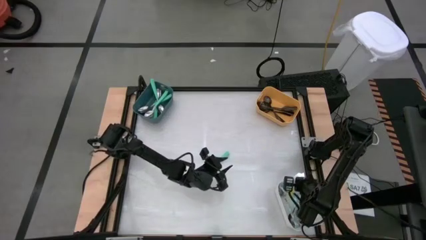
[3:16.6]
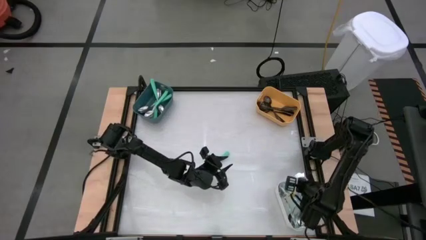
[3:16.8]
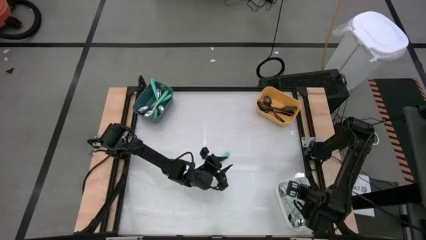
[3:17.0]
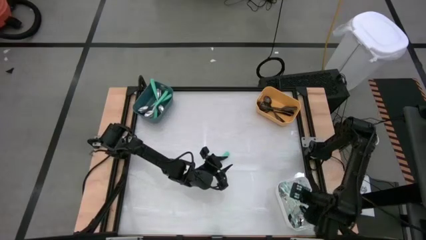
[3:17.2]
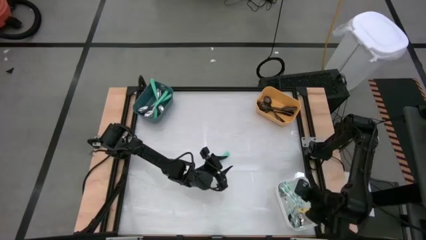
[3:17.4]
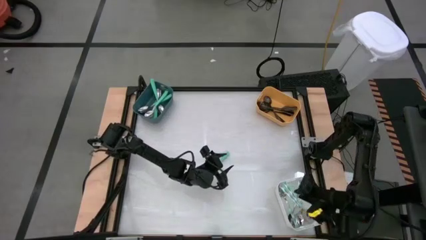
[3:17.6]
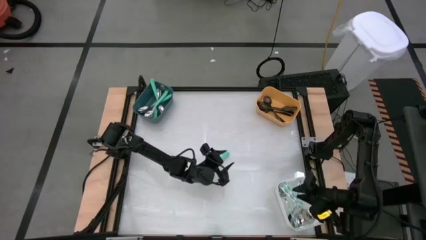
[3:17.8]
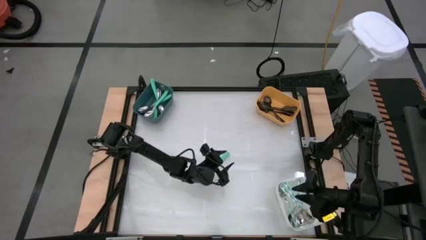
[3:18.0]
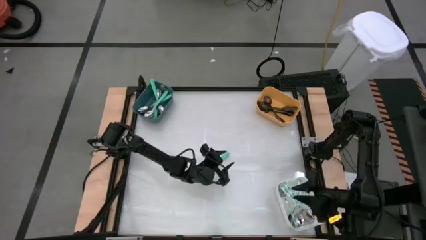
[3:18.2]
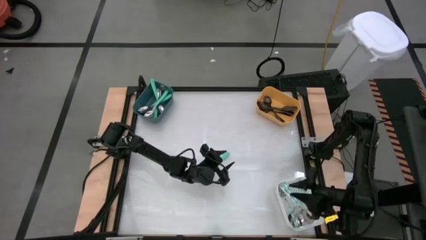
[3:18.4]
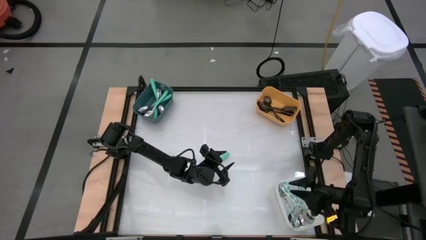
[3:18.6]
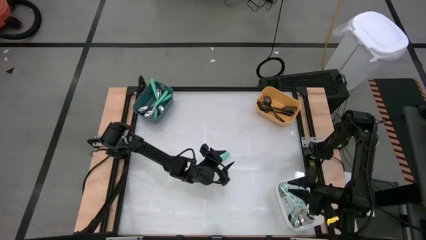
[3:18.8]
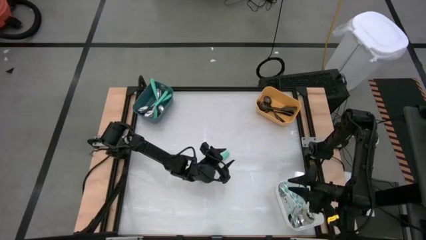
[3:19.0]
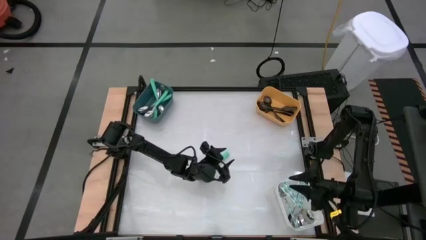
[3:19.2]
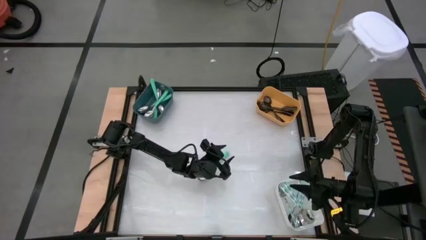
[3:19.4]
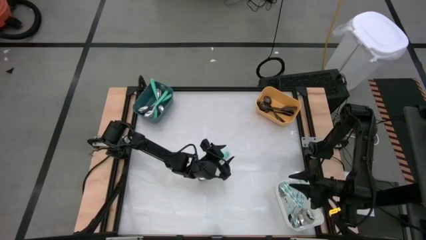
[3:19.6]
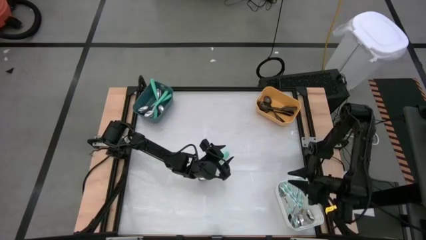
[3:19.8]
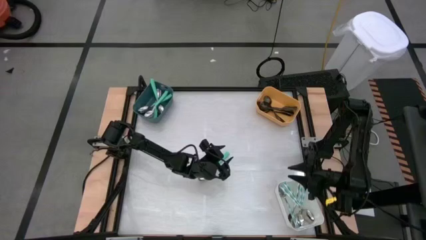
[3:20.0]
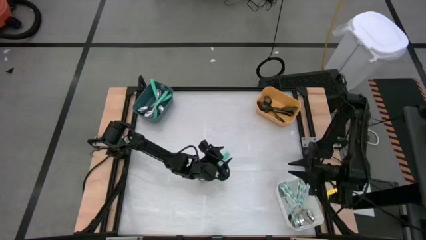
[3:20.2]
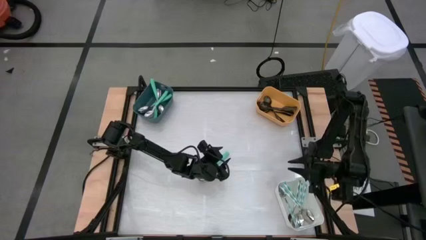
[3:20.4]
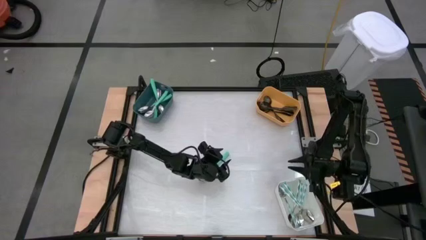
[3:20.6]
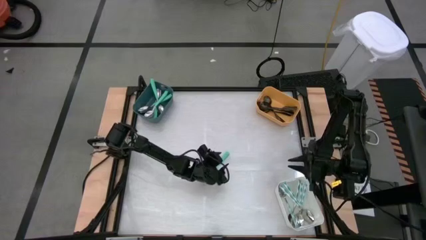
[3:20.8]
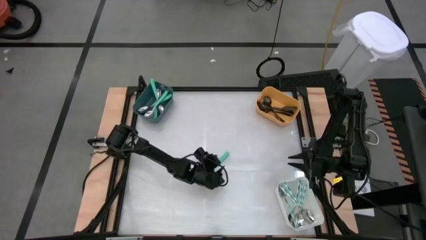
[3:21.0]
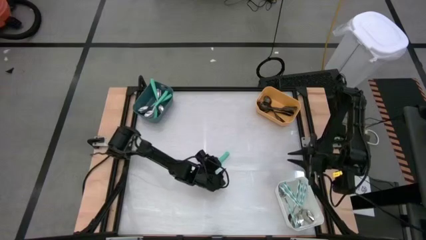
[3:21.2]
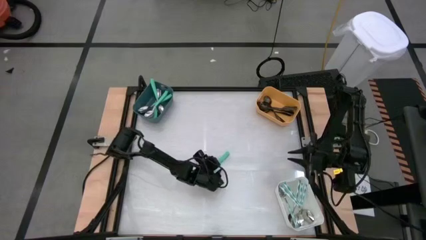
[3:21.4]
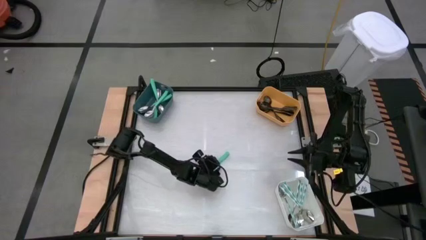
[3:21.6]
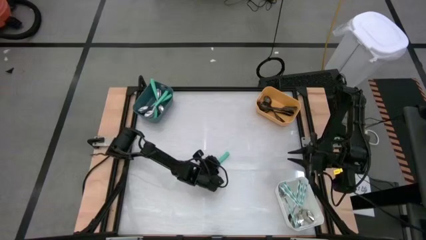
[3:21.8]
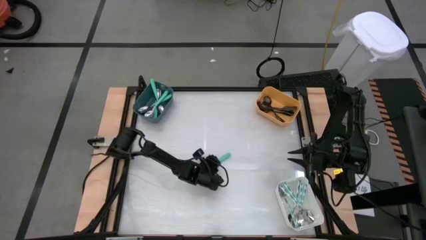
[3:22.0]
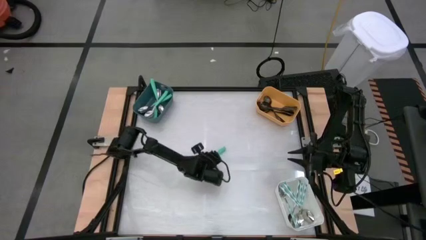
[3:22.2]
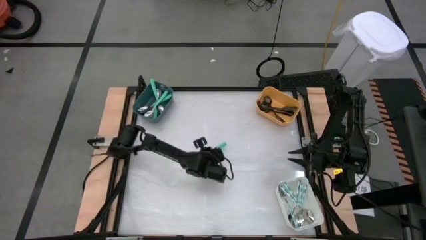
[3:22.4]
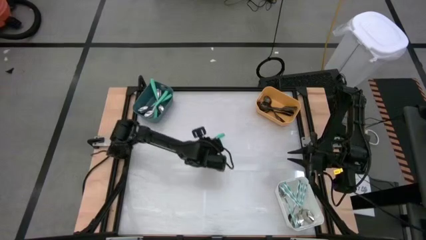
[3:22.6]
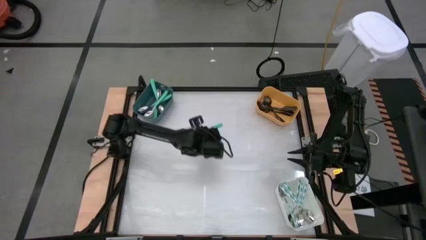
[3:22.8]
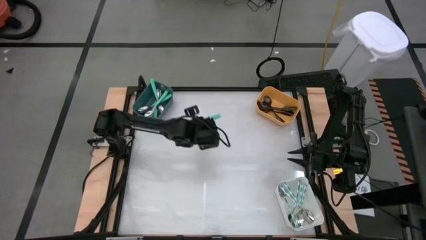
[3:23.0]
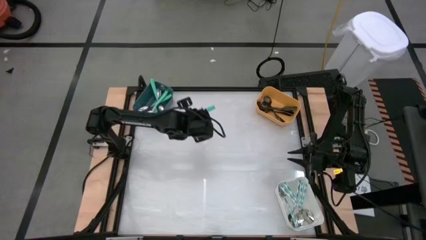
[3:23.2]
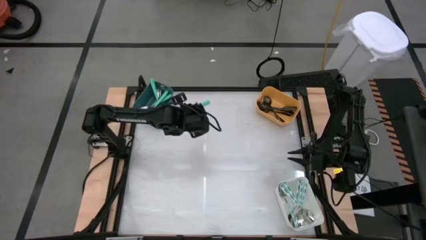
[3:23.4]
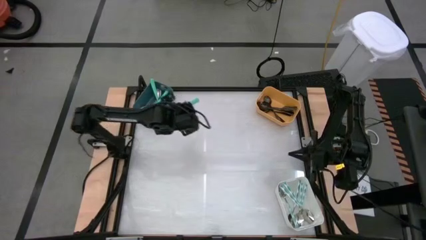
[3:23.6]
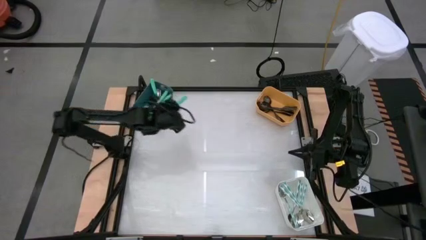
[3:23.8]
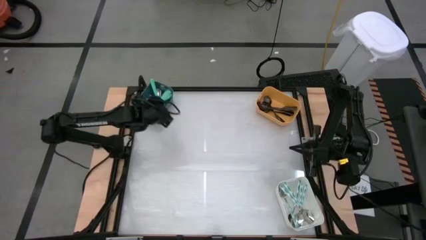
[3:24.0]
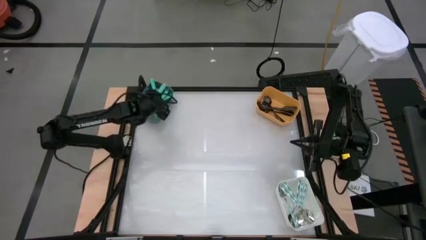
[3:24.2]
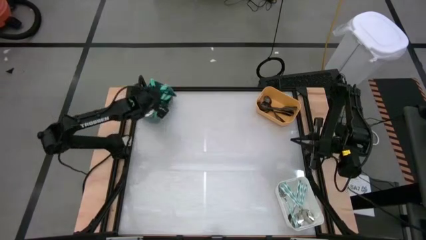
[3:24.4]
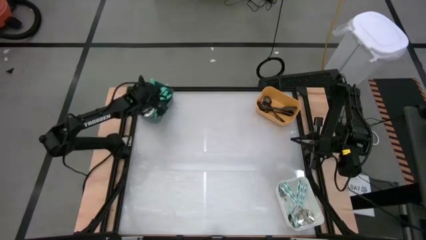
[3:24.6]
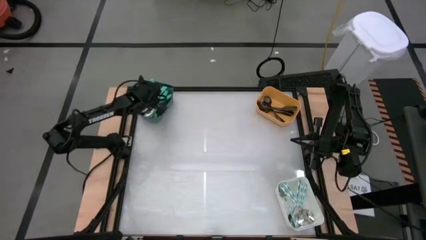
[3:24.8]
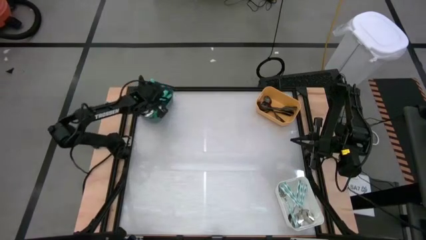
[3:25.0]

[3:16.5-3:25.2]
Task: Sort silverware by color (type)
Put the green spoon into the blue bin

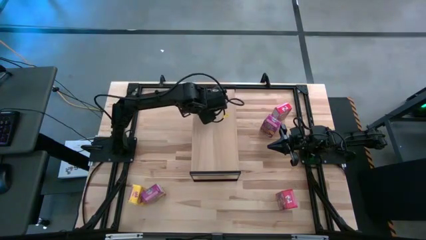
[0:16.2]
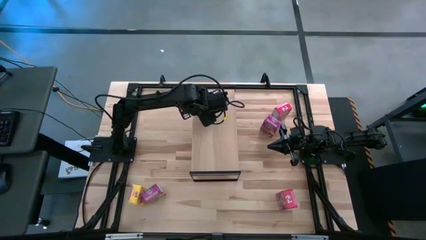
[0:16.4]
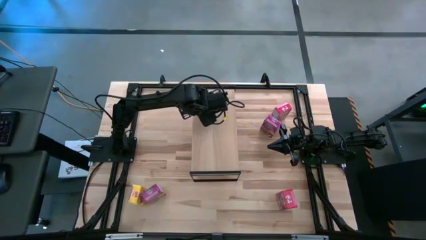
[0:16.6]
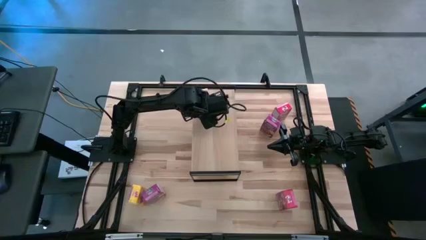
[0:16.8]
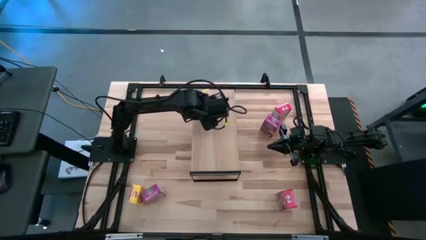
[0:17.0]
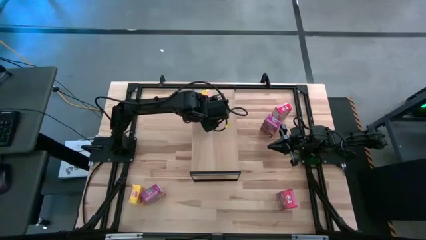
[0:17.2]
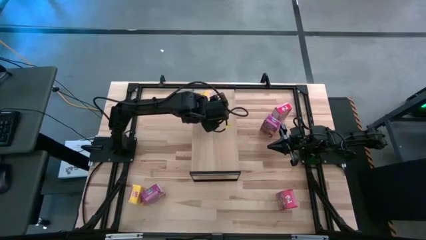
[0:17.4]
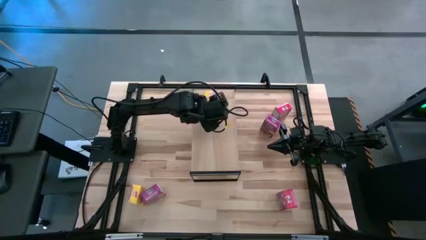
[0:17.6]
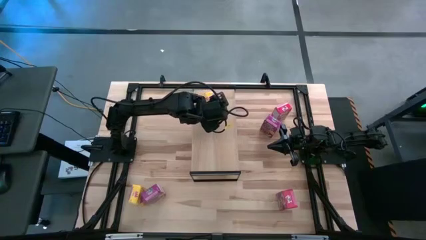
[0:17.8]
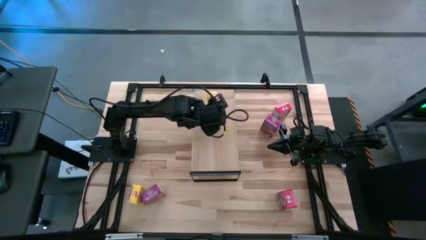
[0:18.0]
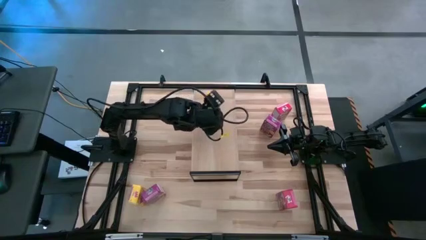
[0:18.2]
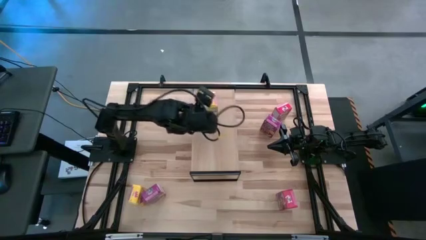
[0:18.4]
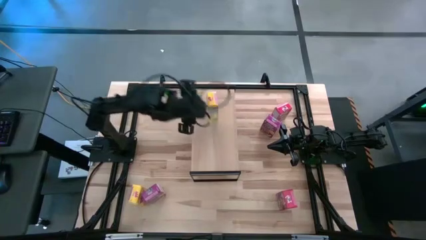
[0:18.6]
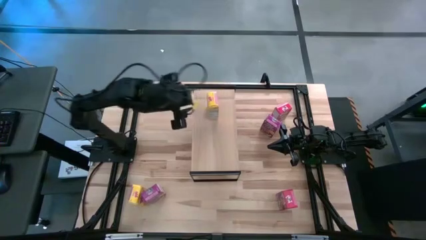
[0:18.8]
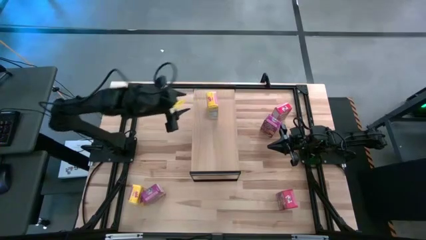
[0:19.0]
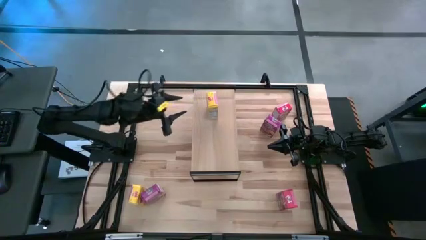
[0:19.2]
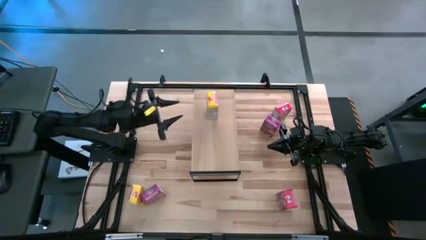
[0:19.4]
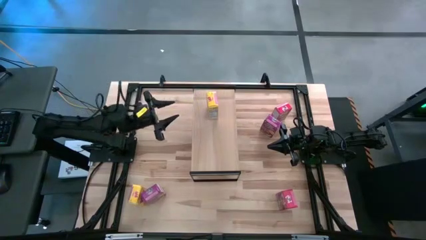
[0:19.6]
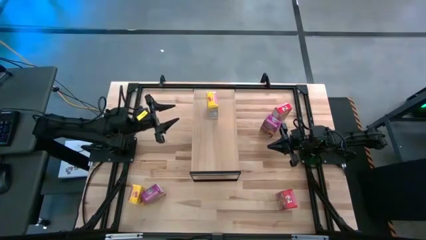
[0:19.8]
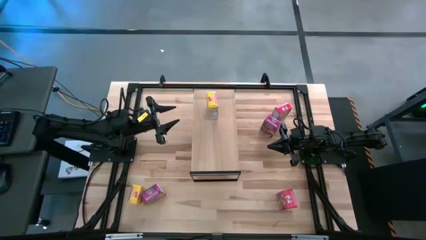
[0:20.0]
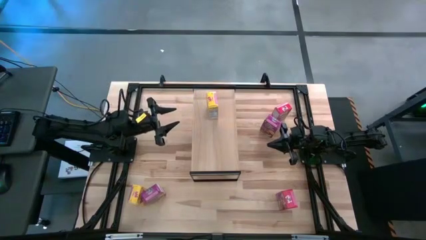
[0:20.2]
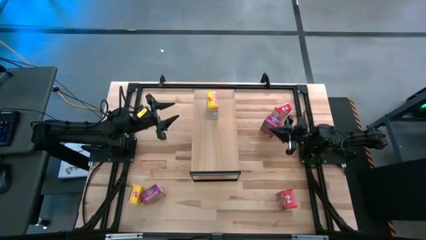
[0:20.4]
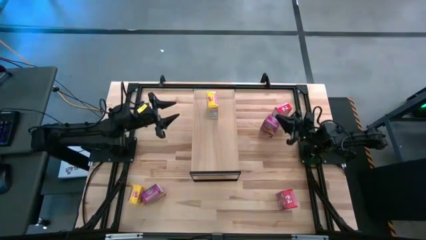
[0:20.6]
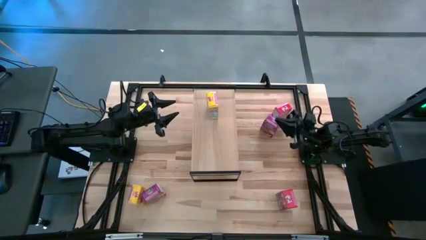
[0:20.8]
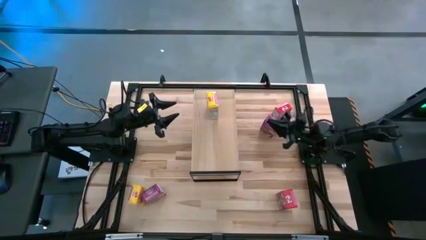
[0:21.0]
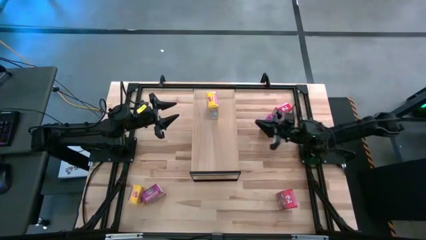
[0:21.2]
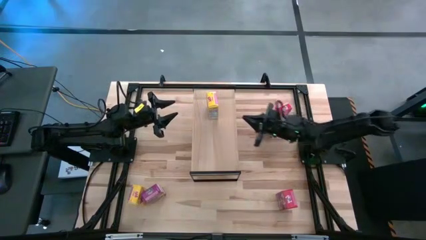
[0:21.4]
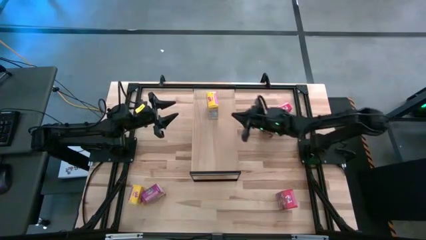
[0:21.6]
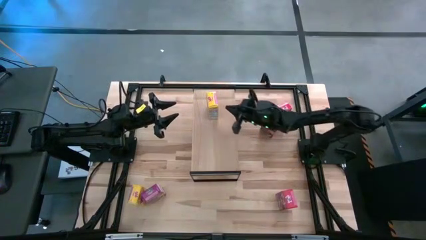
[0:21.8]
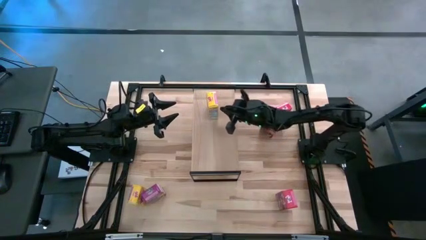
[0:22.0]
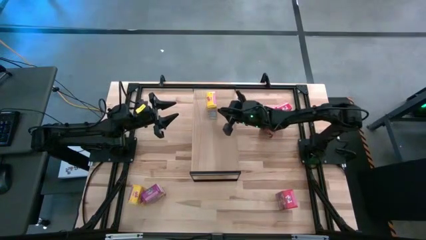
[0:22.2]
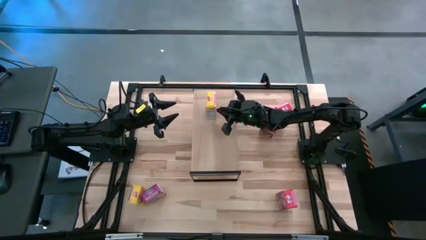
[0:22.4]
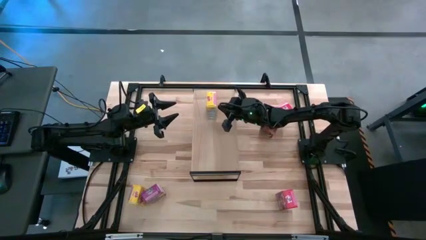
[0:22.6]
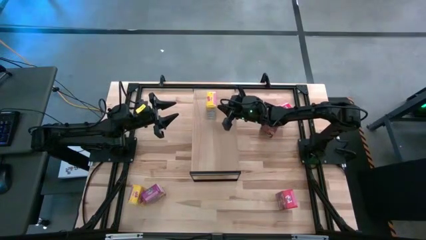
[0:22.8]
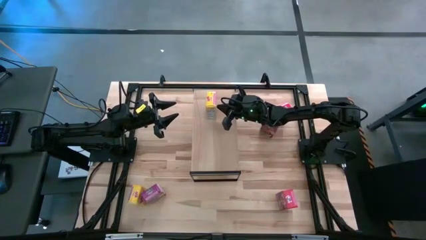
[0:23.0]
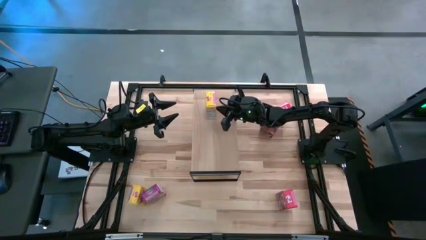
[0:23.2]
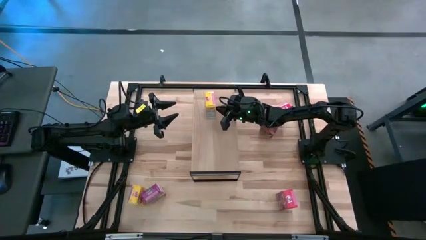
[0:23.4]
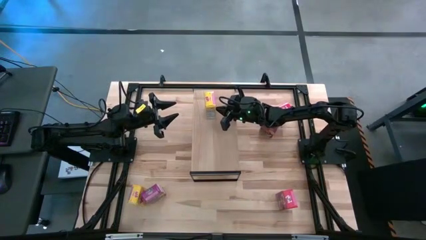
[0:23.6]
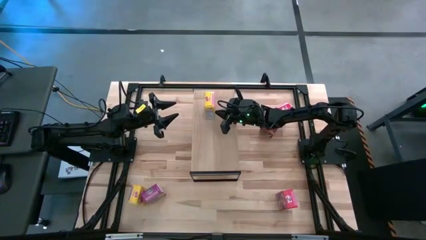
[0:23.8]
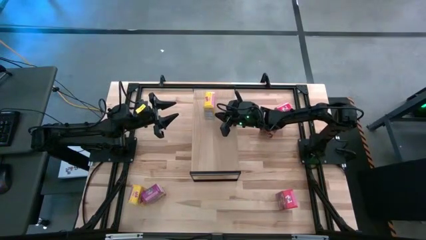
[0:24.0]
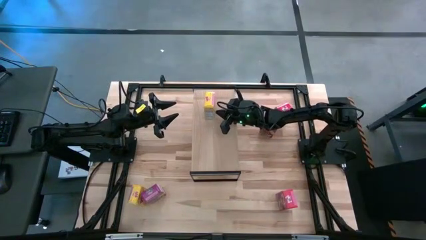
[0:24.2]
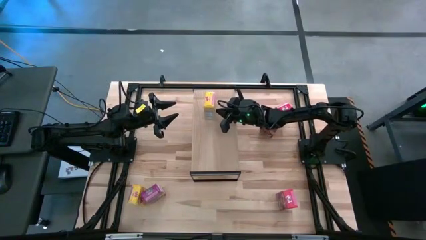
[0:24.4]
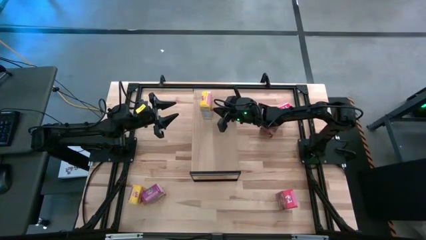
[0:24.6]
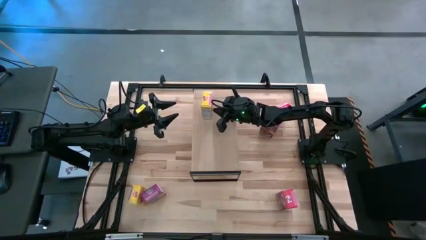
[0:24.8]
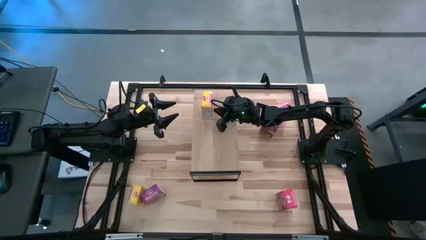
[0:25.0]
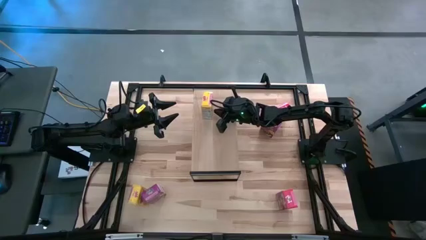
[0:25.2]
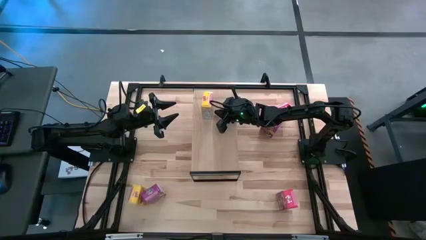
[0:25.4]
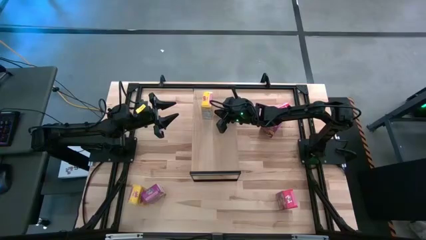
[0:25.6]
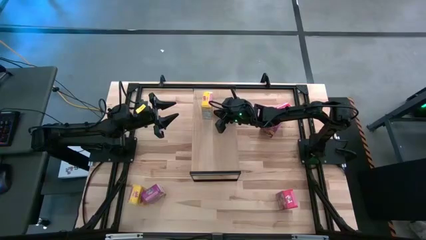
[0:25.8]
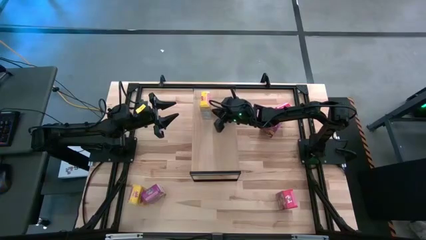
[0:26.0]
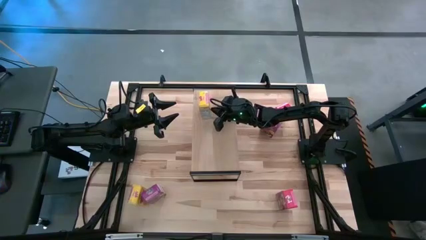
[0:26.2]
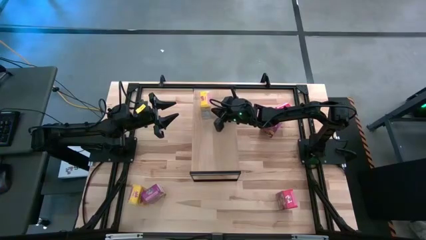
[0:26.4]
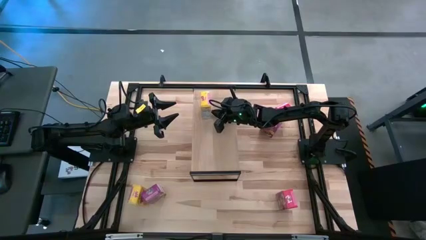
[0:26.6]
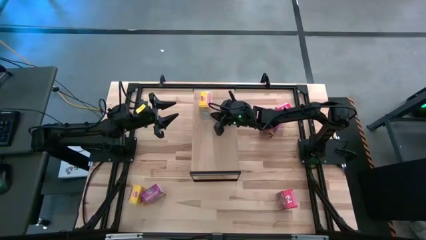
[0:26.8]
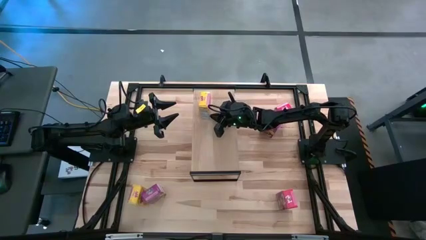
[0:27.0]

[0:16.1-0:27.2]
Task: Stack cereal on shelf
Put the top yellow cereal box on the shelf
